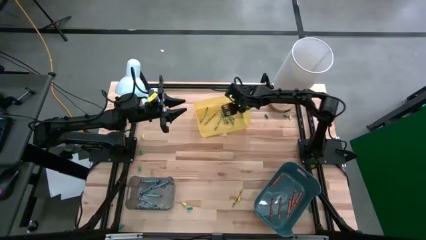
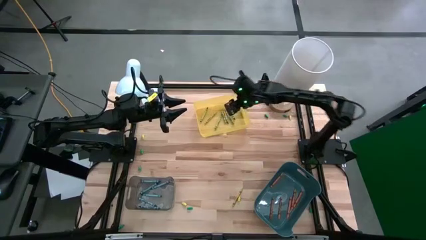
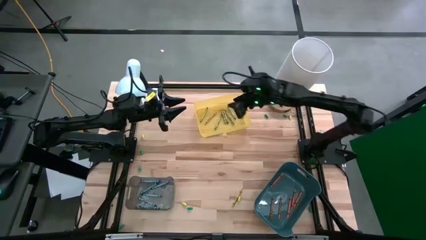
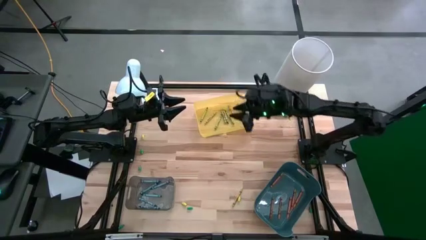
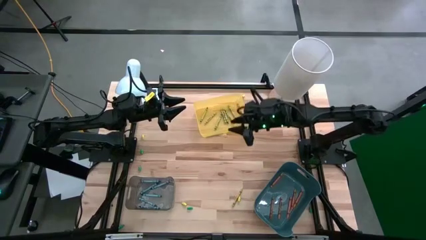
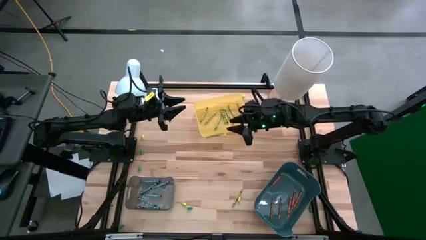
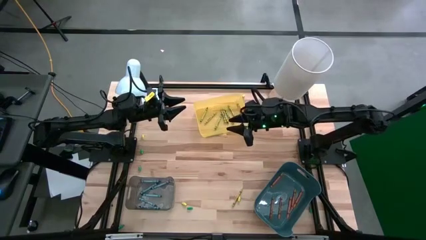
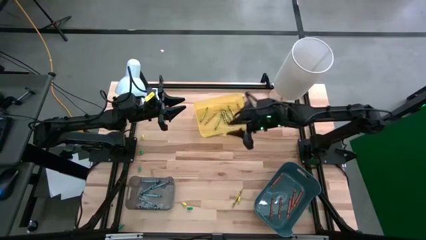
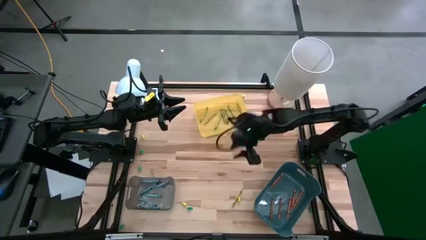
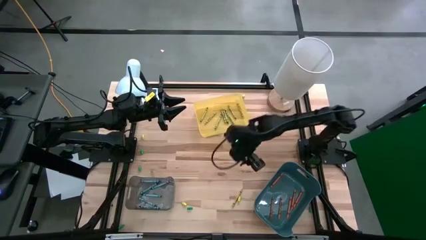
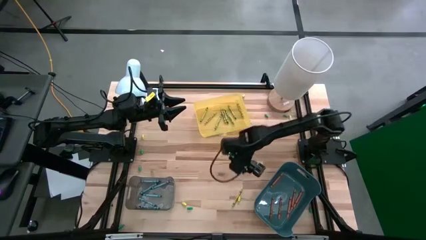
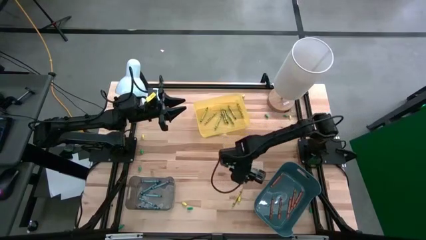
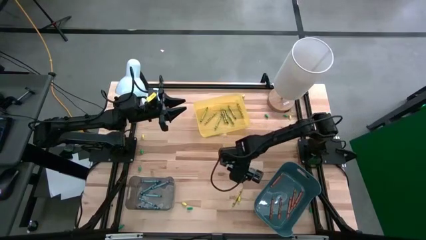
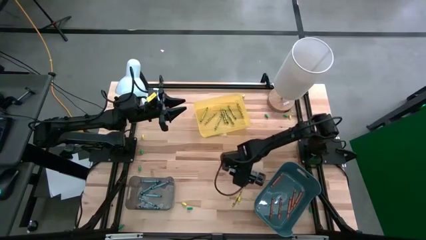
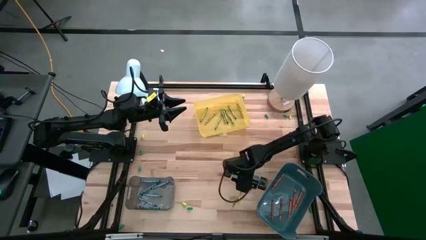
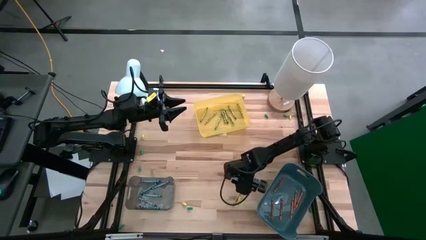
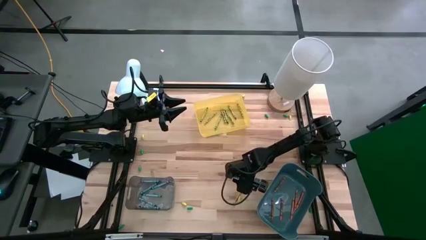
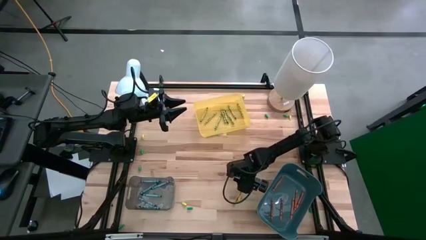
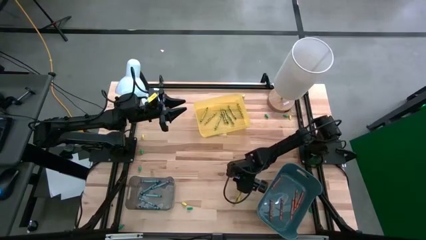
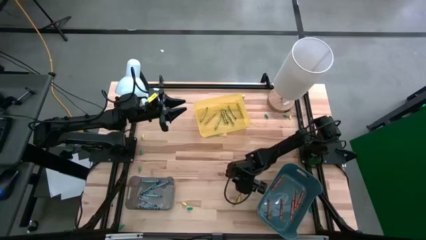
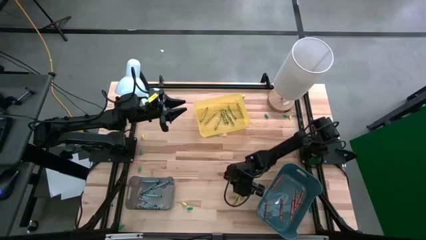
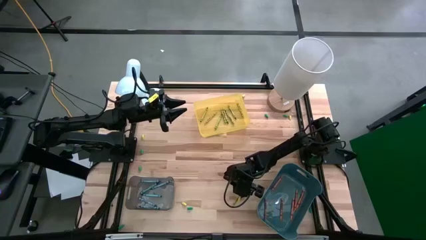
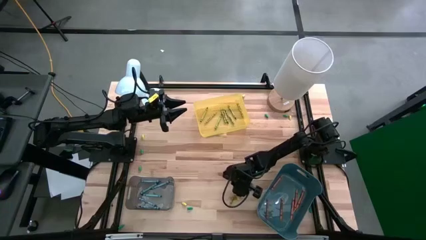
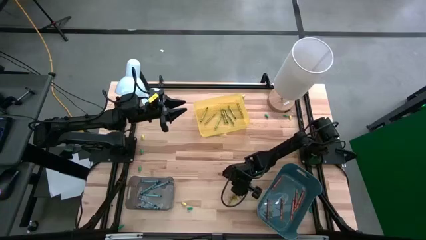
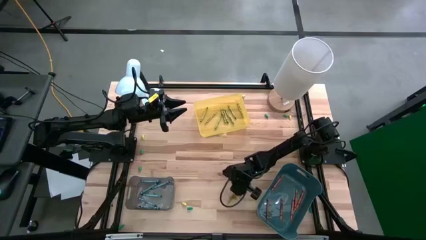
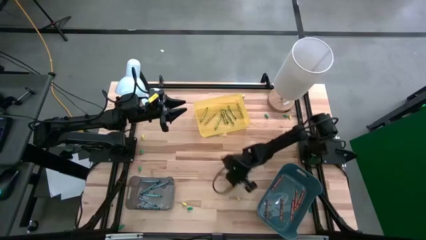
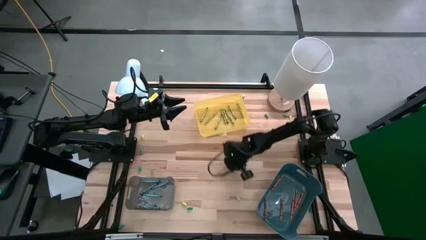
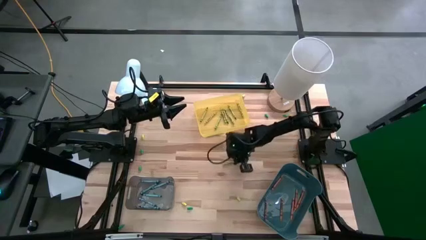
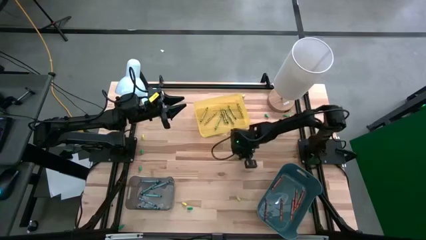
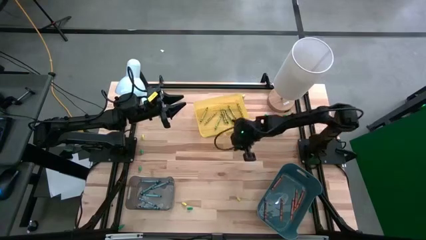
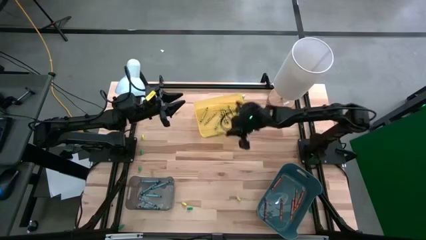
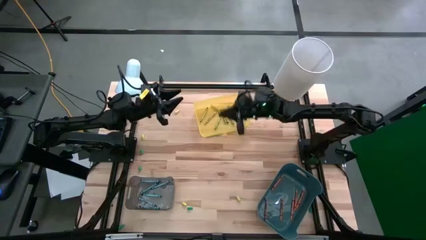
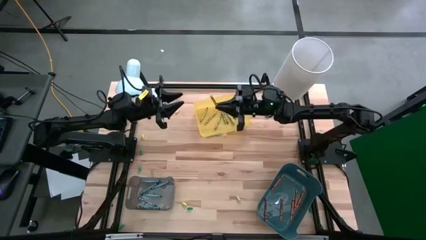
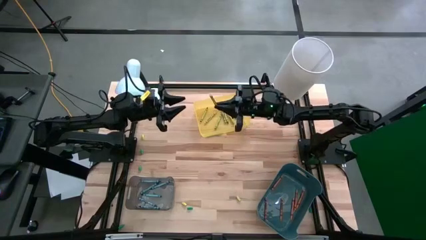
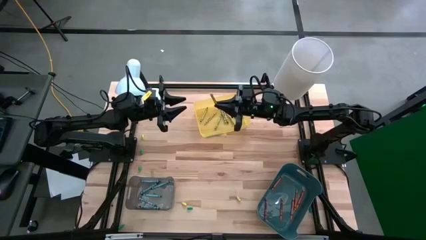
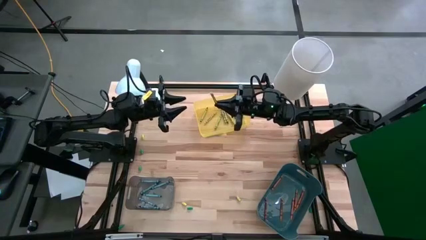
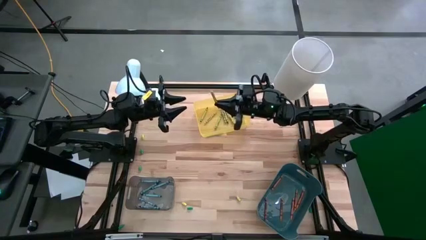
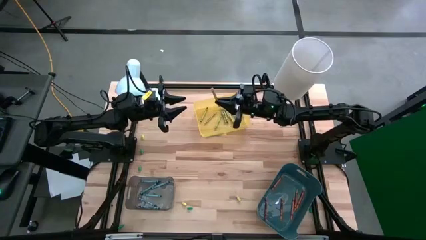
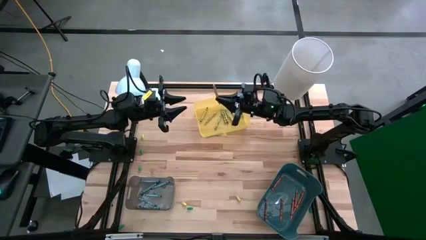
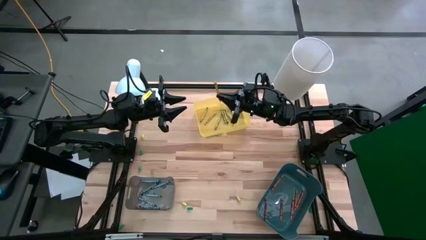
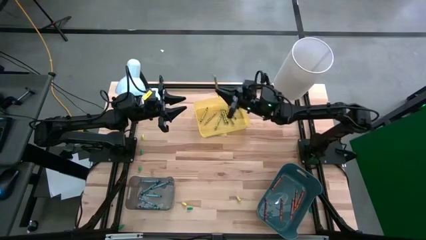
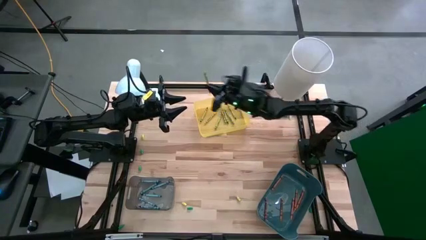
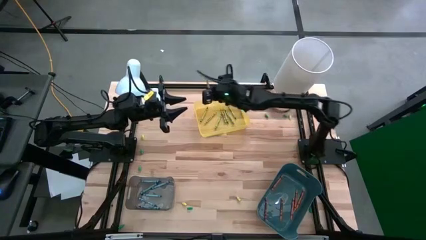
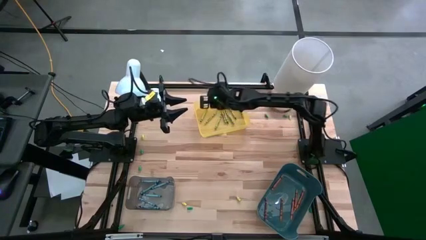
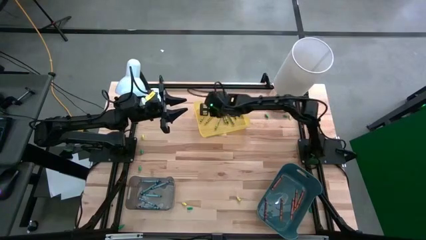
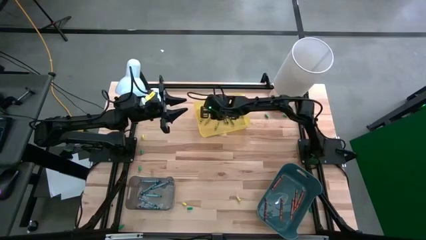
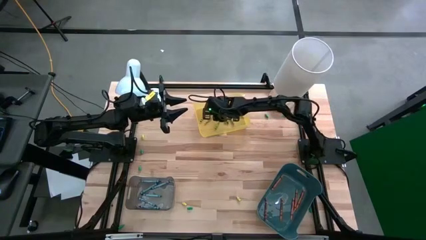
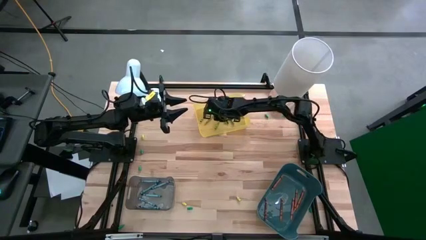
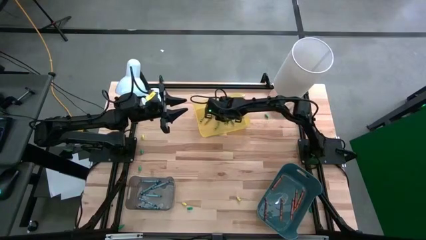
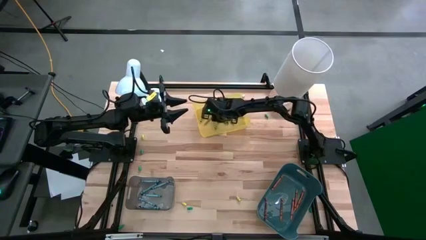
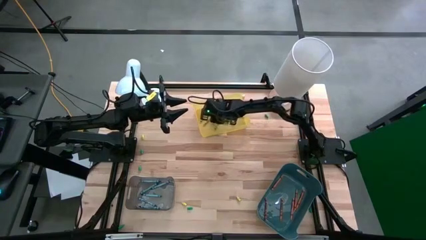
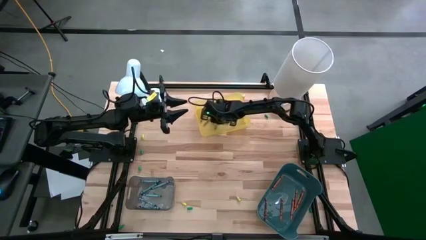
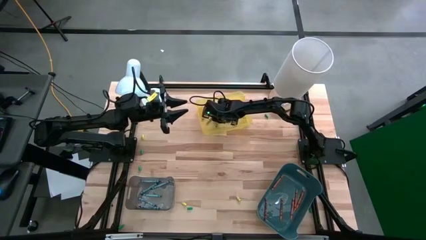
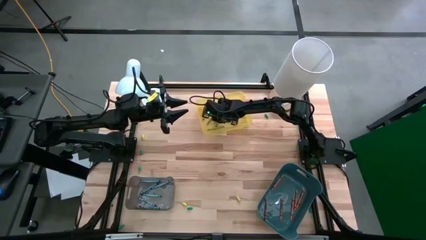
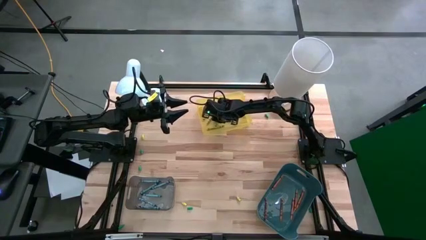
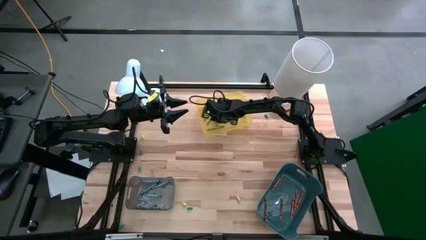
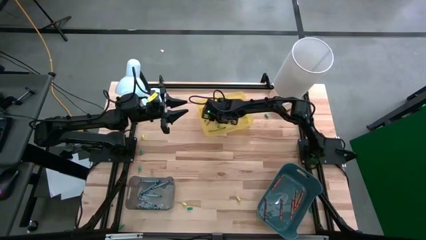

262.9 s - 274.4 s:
Task: Sort crayons
Put the yellow green crayon into the yellow bin

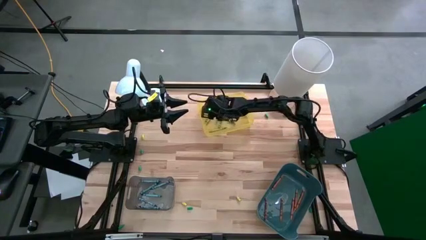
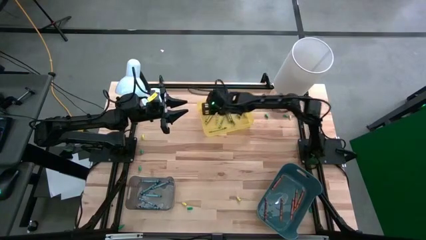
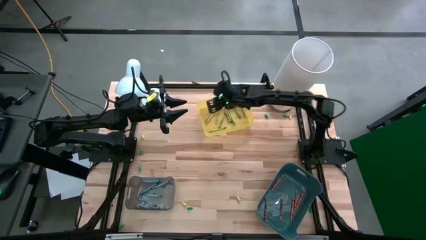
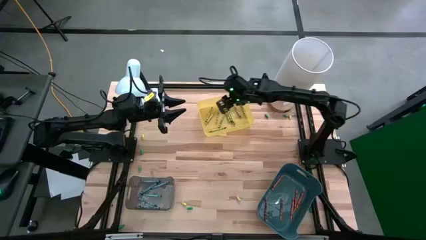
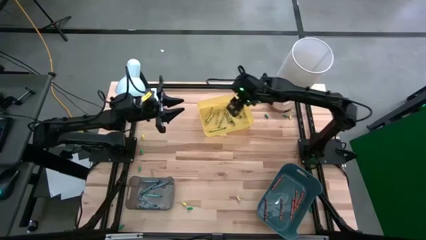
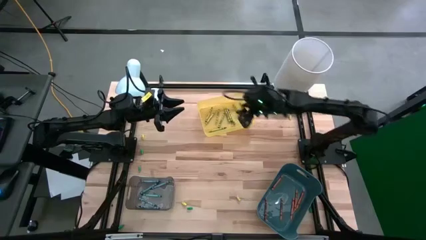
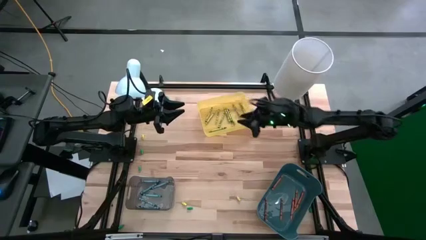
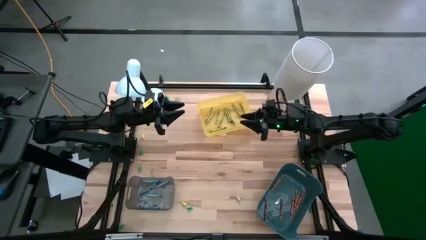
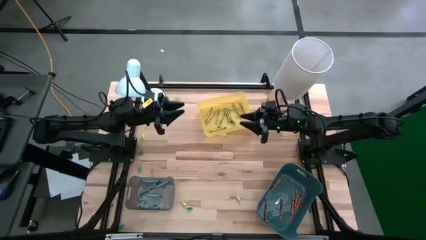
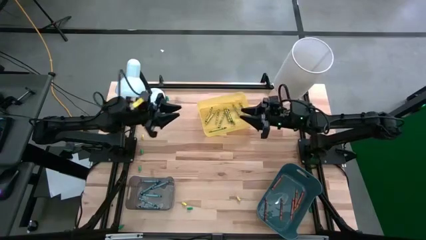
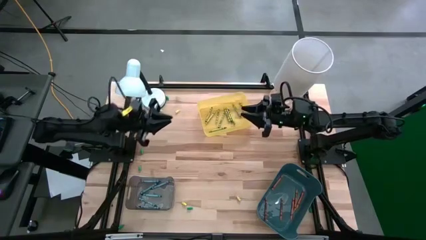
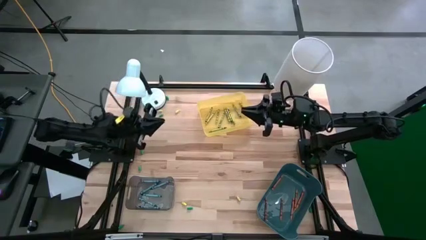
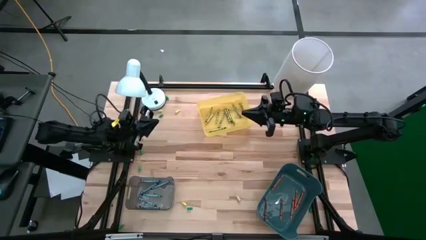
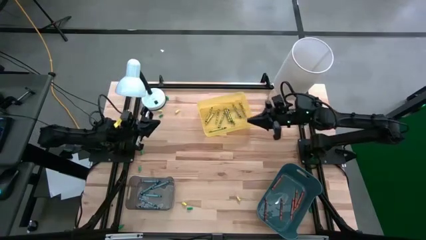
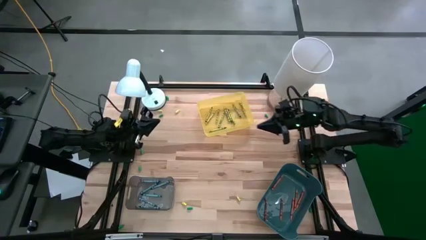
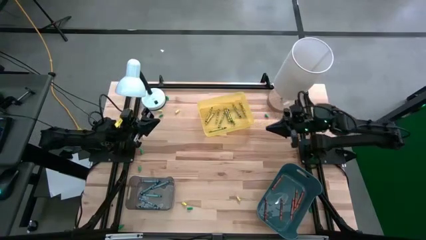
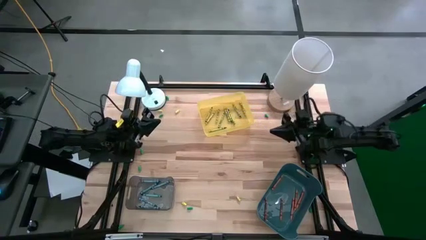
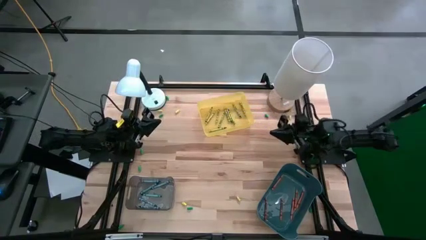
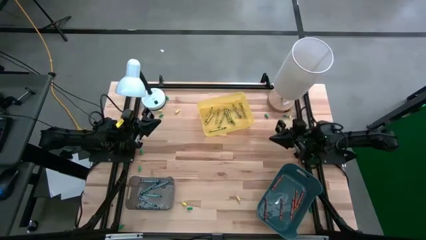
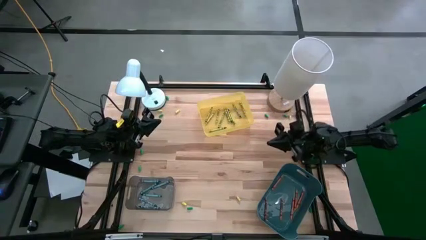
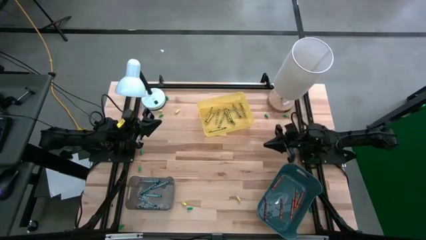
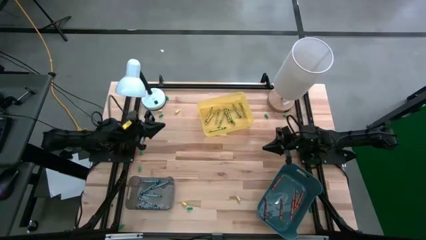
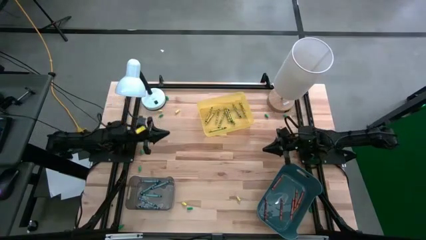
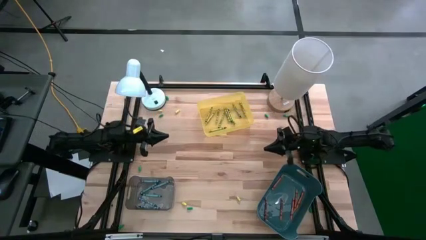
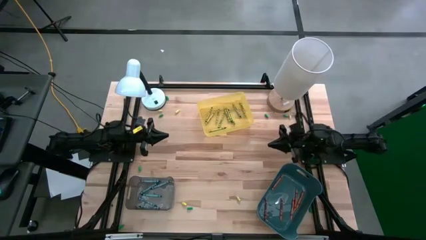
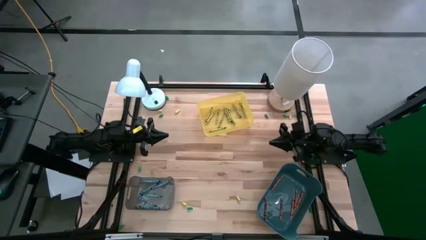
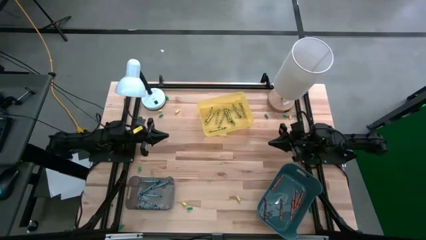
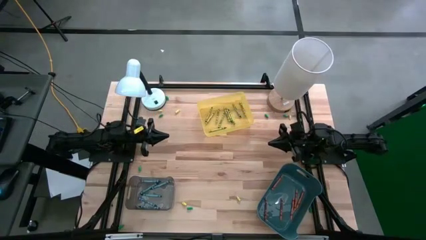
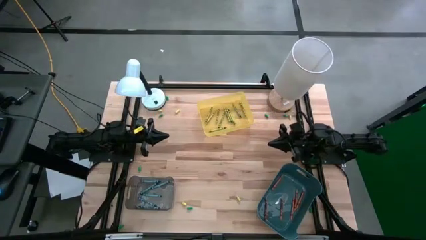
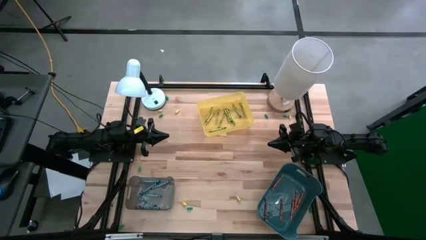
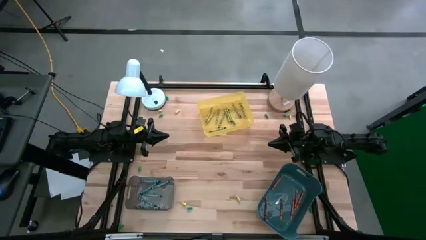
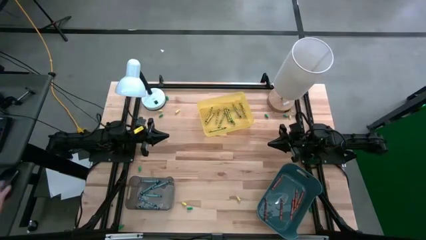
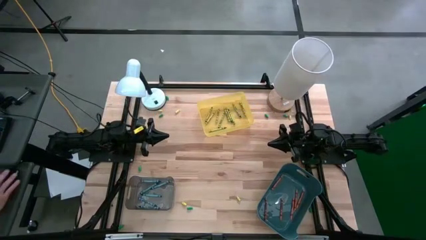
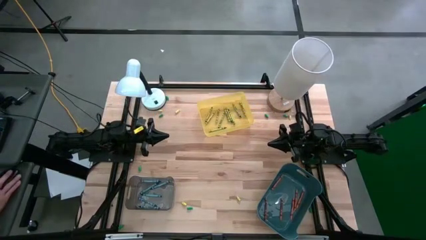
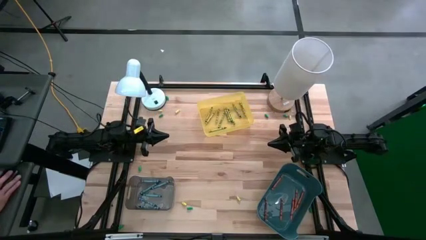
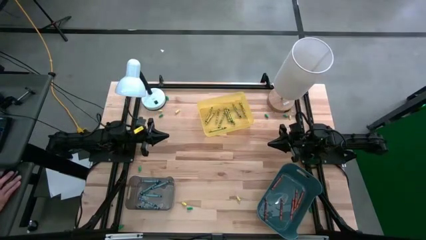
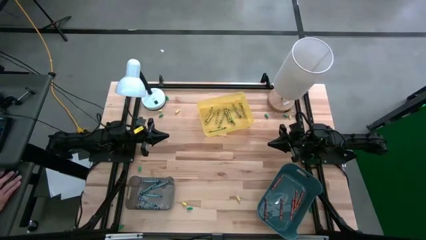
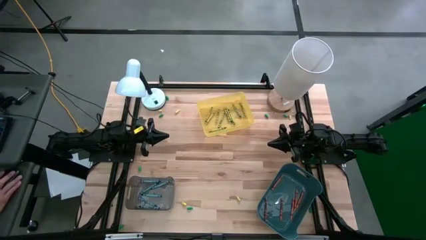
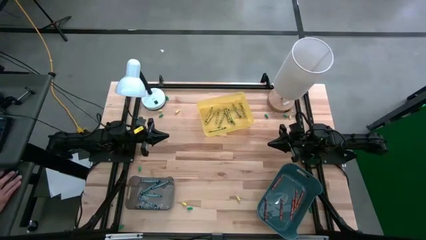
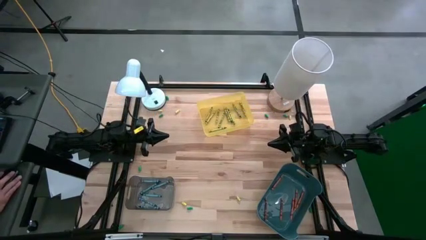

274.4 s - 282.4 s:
Return to Home Position
